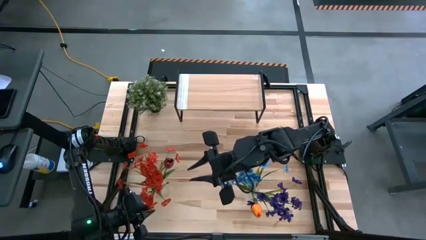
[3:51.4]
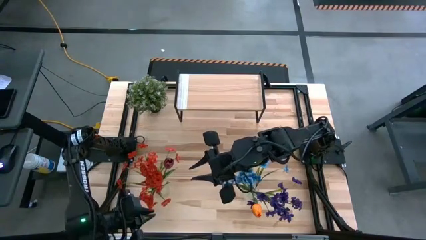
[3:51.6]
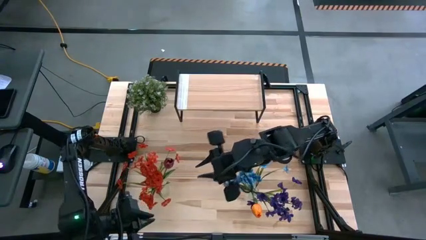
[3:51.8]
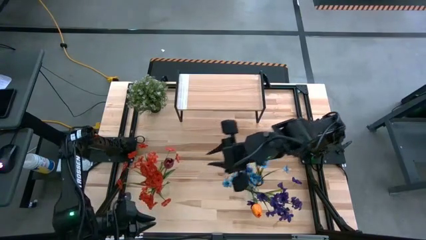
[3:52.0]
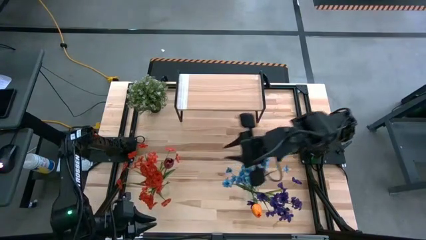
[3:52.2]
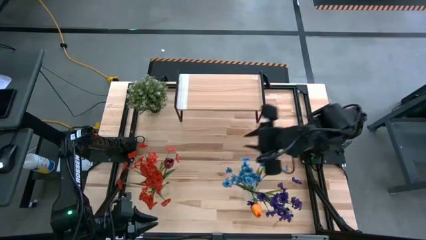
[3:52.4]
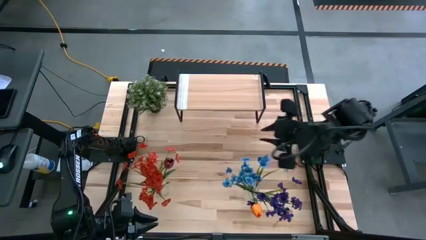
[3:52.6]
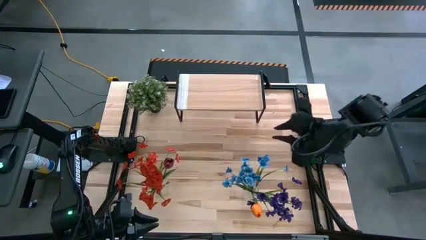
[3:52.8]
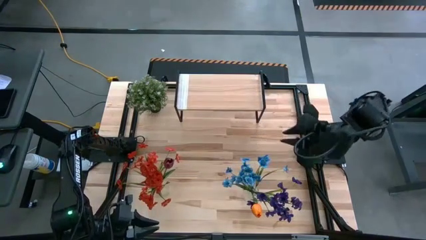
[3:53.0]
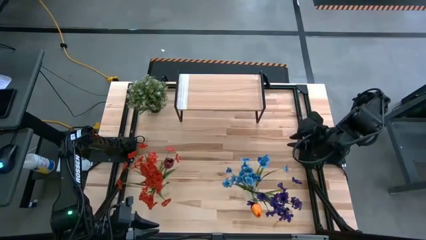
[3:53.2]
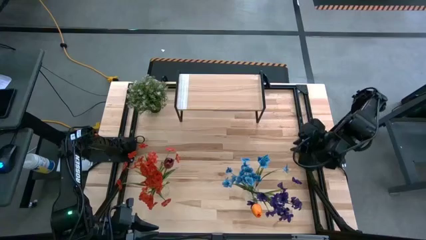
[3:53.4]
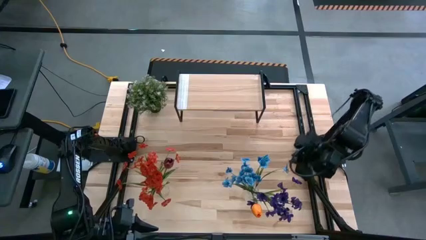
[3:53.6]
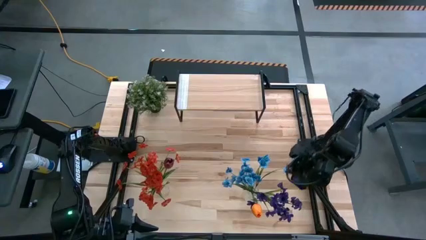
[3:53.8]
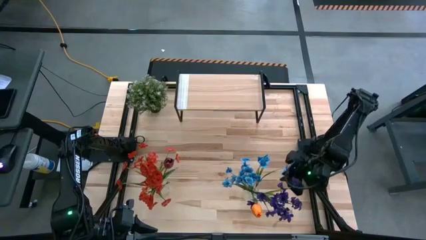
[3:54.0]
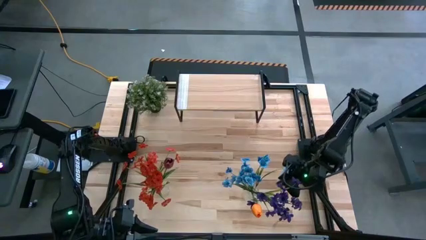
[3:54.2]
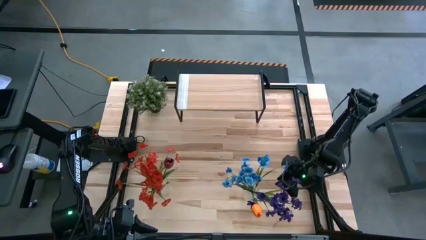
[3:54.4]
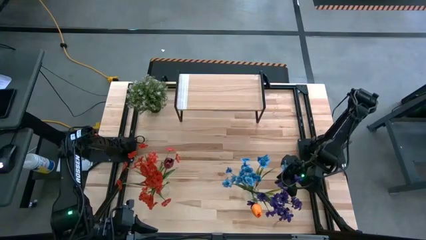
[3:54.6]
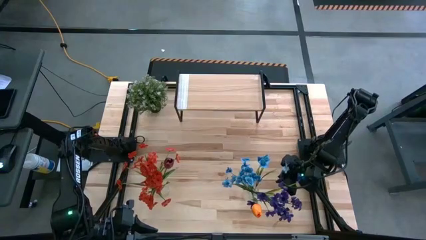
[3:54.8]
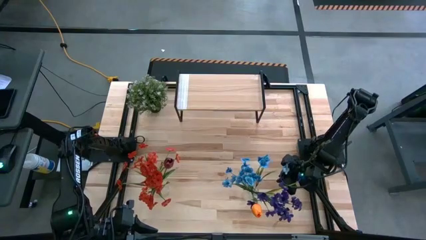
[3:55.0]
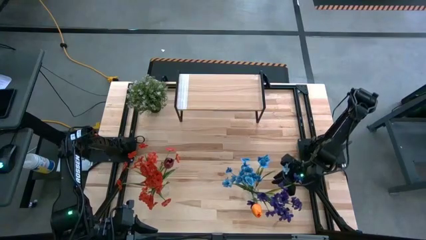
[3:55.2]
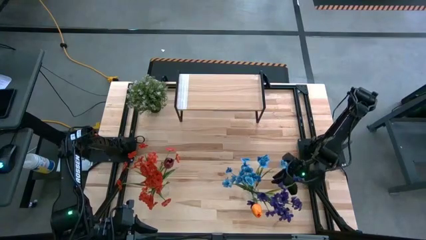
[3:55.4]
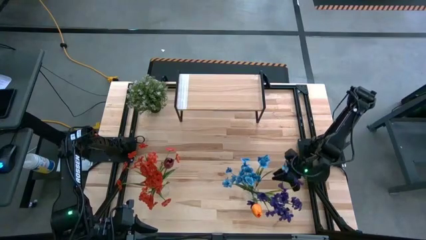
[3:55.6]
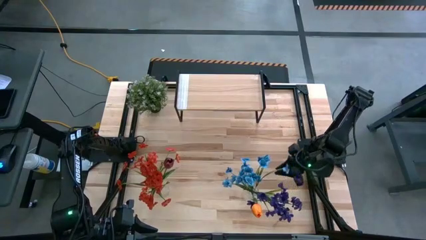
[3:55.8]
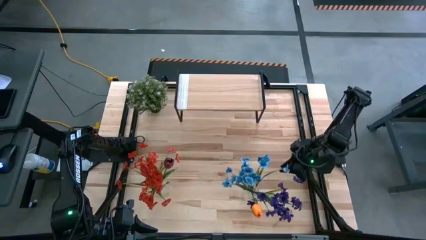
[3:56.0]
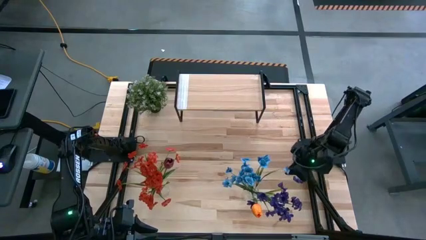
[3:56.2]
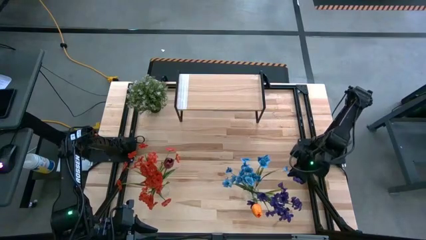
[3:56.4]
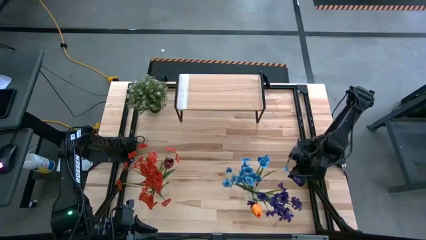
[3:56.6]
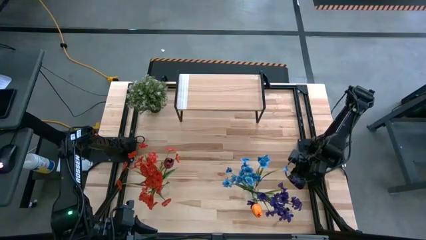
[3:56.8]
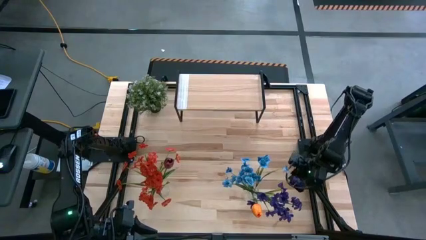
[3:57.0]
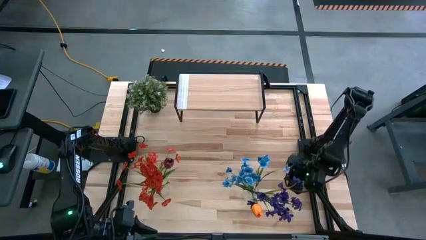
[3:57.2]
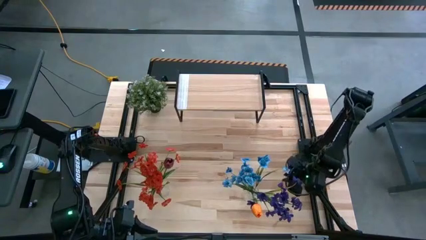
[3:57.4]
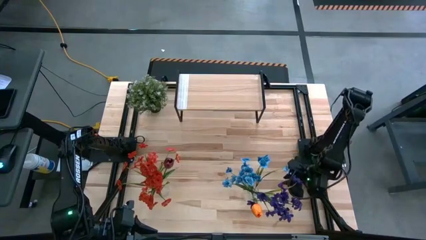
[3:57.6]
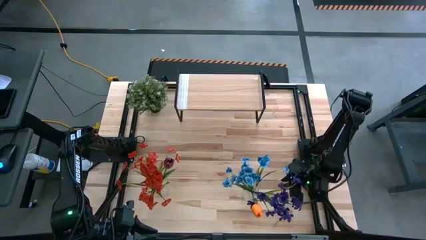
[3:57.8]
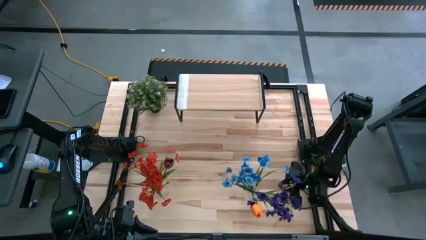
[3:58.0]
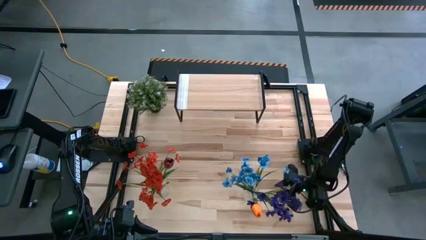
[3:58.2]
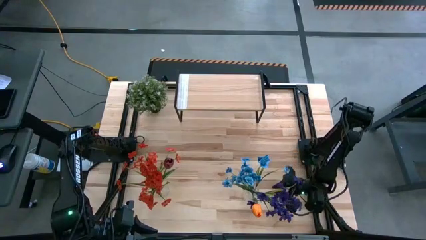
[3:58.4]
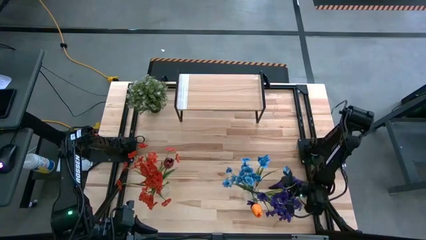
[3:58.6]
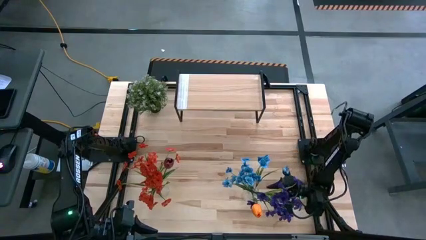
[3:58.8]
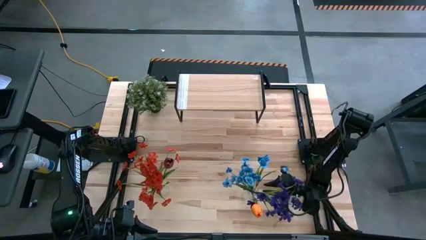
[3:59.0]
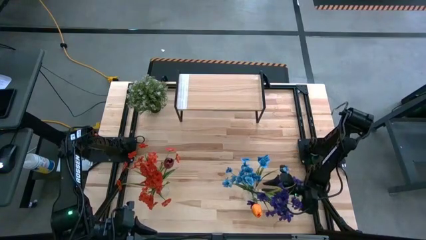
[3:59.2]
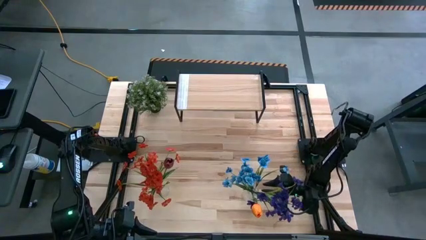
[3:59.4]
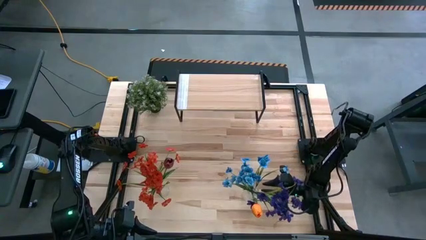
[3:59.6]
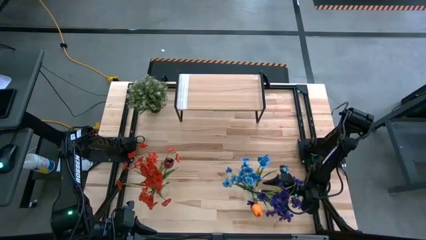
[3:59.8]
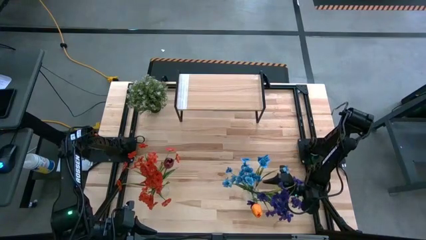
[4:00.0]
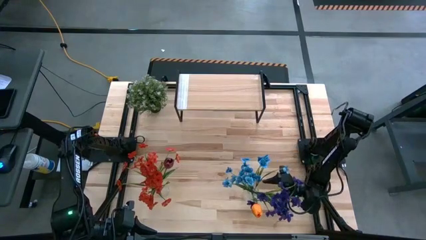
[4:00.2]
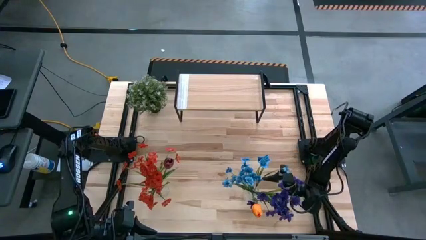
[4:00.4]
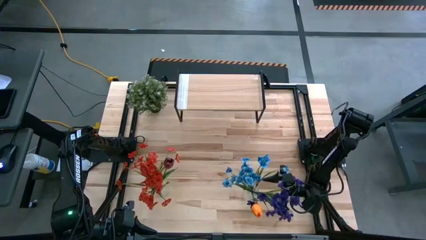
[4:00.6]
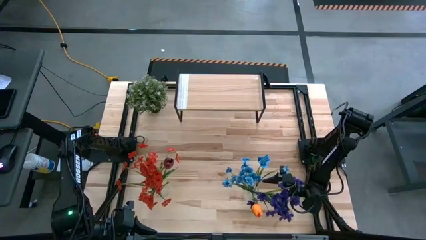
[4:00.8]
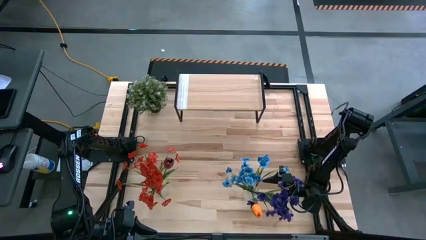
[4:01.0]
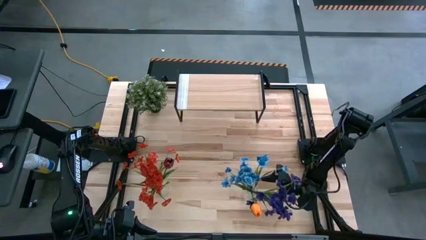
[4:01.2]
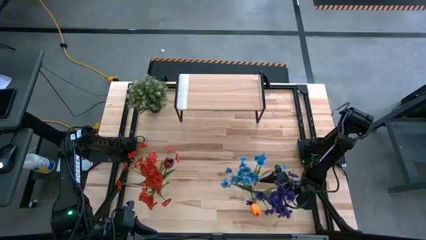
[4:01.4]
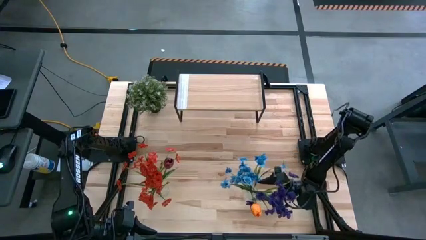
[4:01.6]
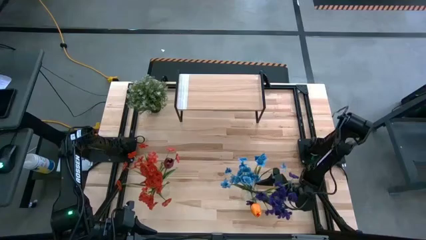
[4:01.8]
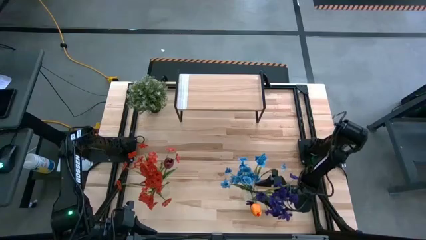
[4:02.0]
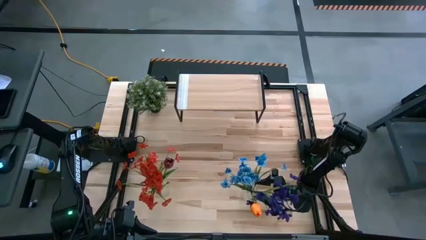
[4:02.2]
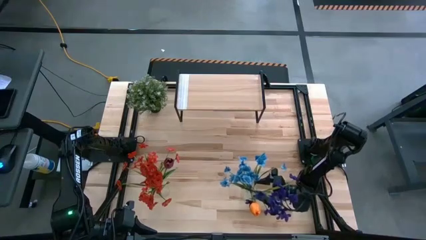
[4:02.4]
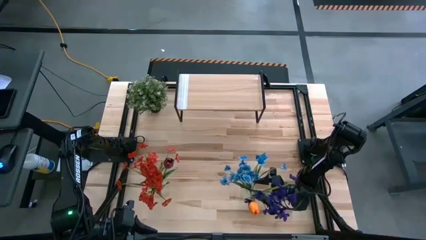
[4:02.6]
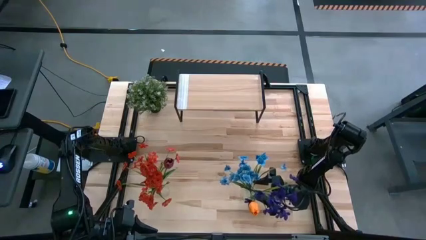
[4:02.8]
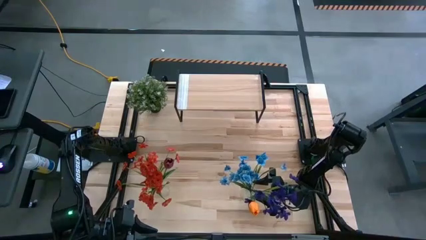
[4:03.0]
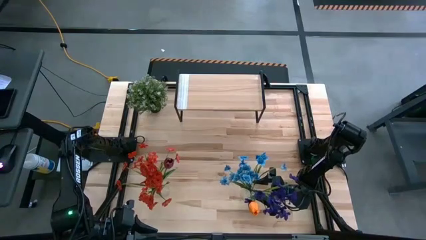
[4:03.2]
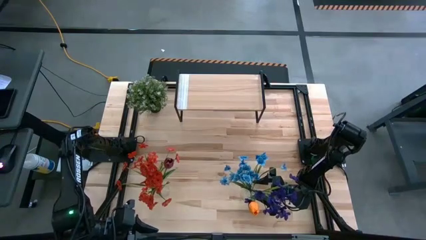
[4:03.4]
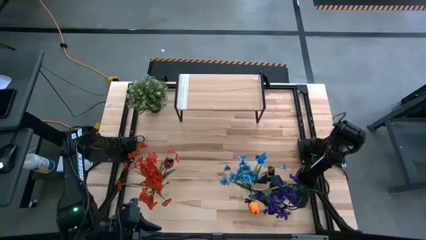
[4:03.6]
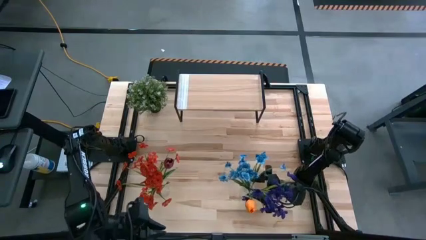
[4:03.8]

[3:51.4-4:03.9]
Task: Pick and place flowers into a vace then onto a shelf
Put the right transparent vase with flowers on the shelf
